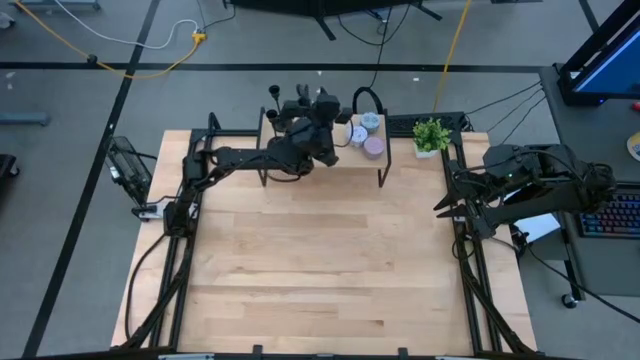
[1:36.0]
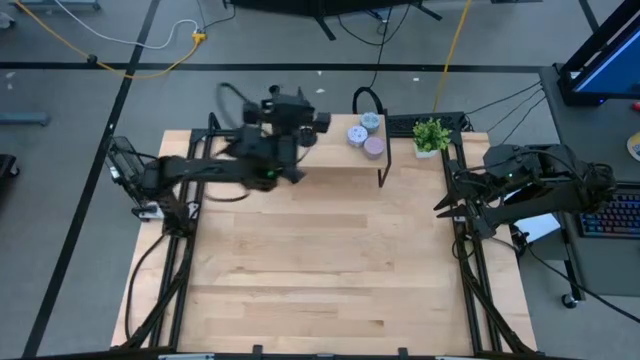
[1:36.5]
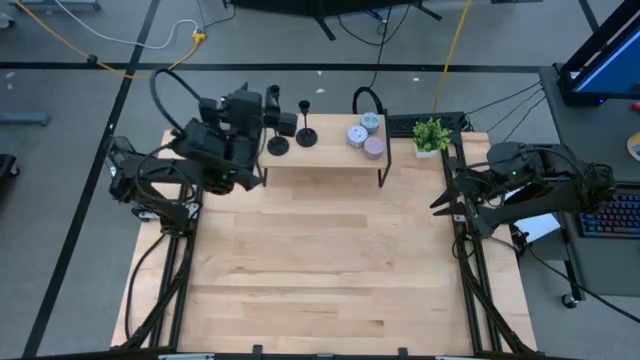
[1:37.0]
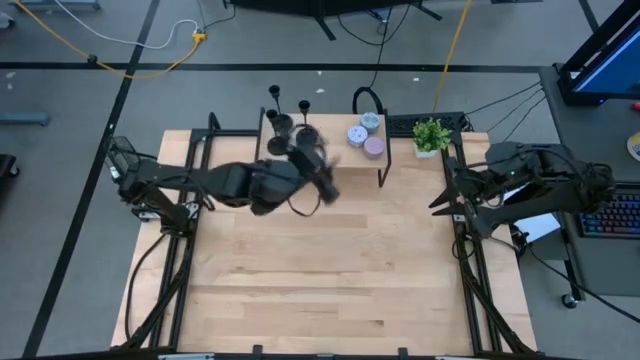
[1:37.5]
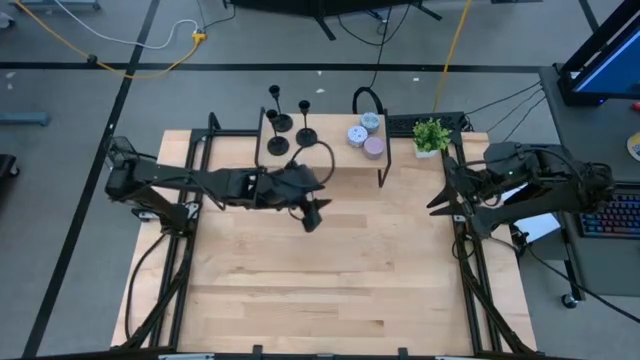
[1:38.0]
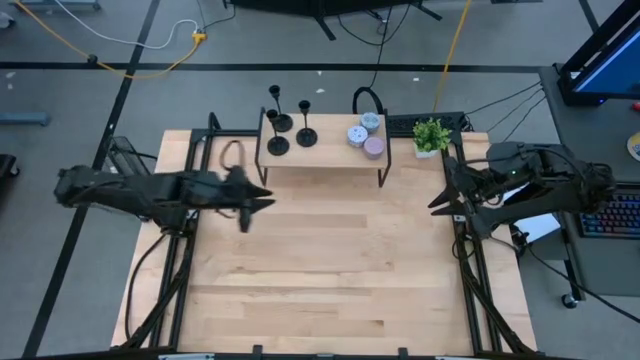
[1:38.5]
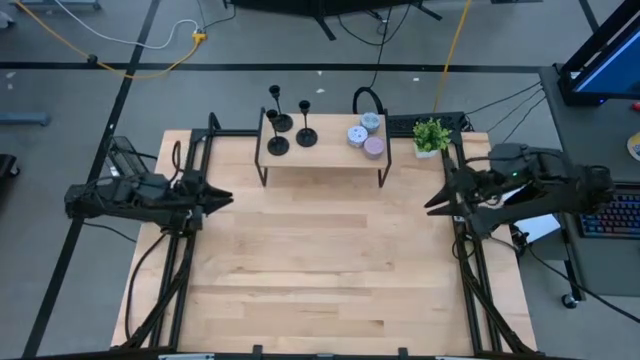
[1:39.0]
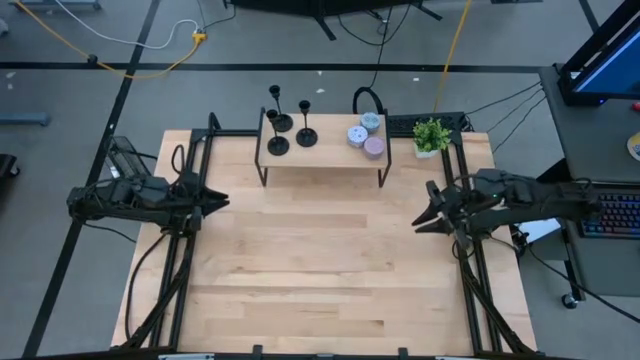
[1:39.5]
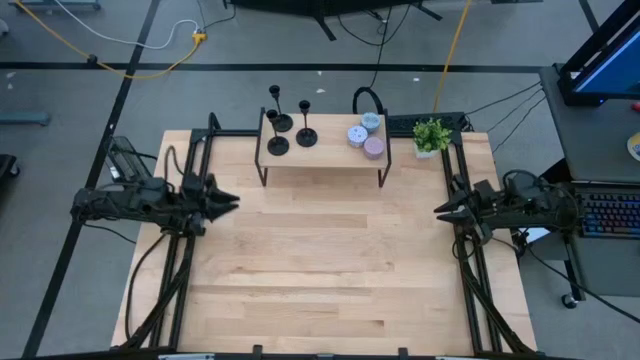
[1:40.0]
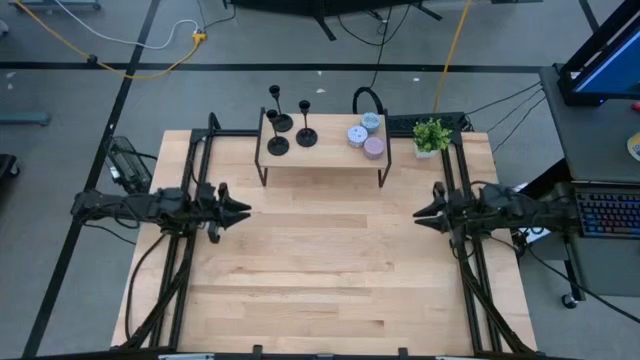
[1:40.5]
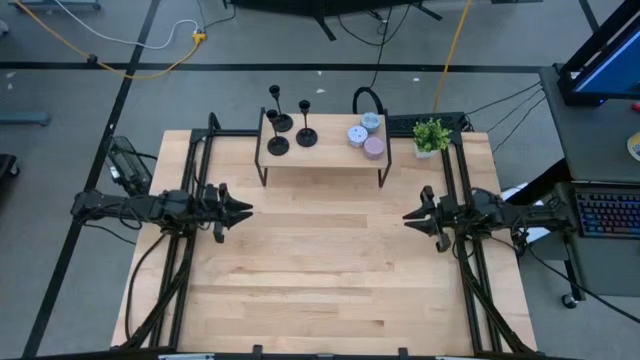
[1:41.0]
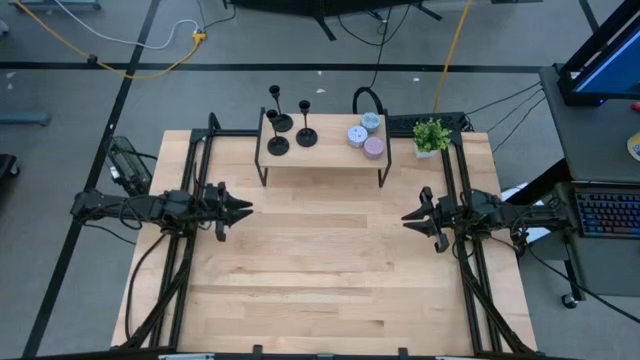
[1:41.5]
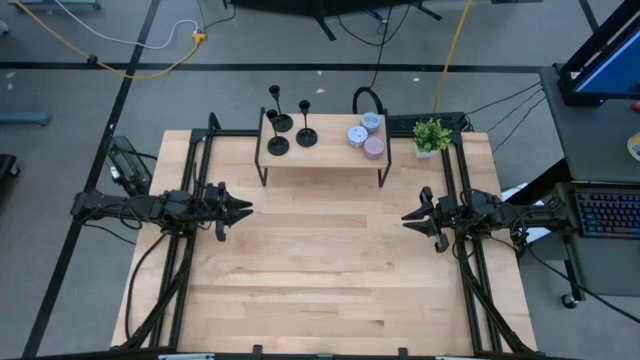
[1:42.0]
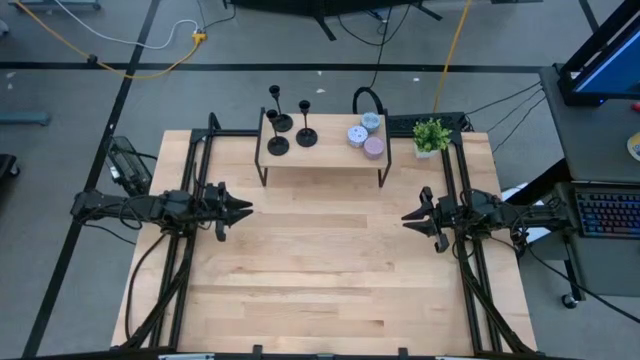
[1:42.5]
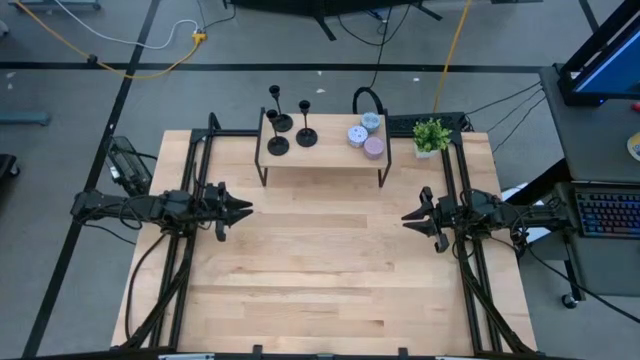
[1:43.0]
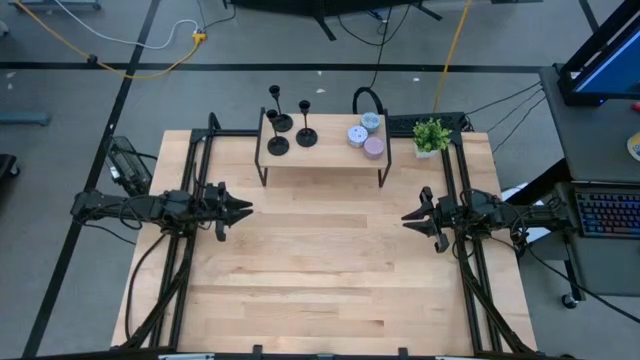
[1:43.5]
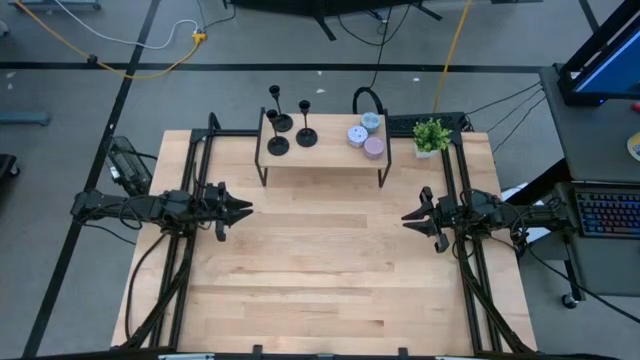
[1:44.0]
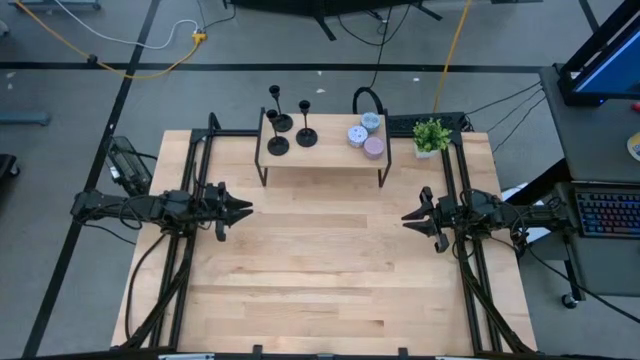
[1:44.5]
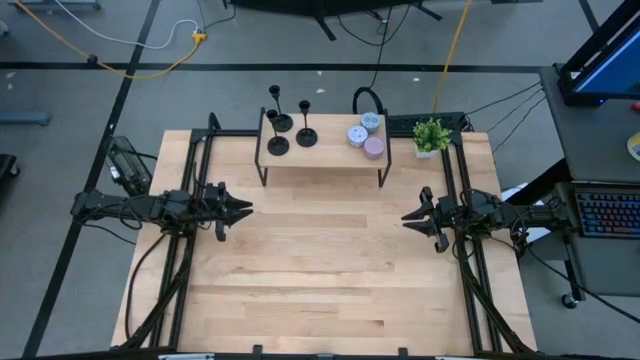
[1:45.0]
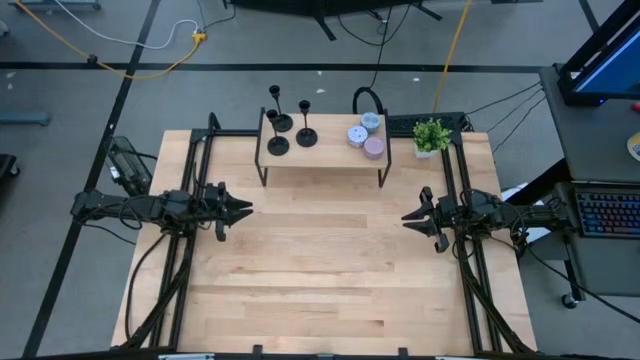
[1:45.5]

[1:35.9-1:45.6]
Task: Pick & Place candle stick holders
Return to Home Position

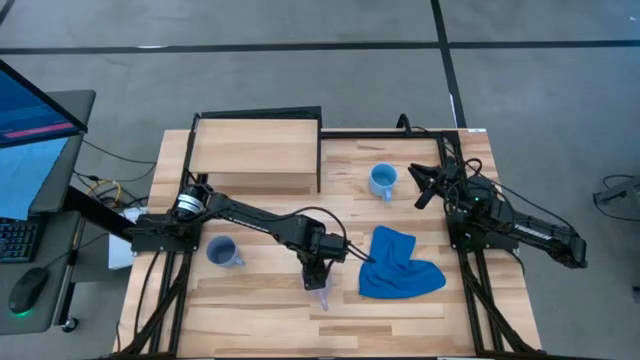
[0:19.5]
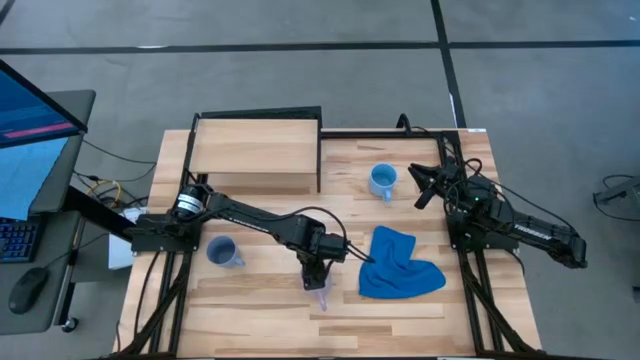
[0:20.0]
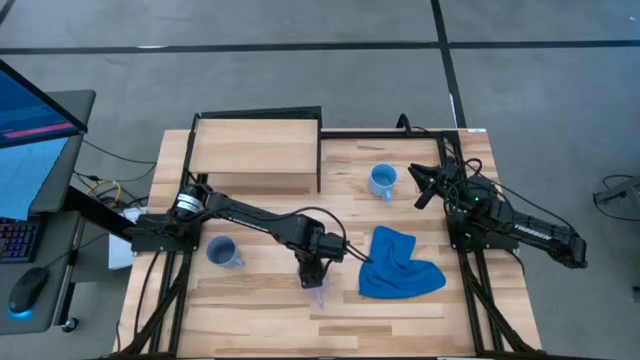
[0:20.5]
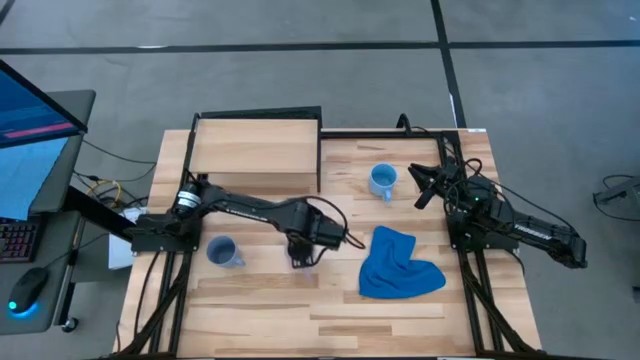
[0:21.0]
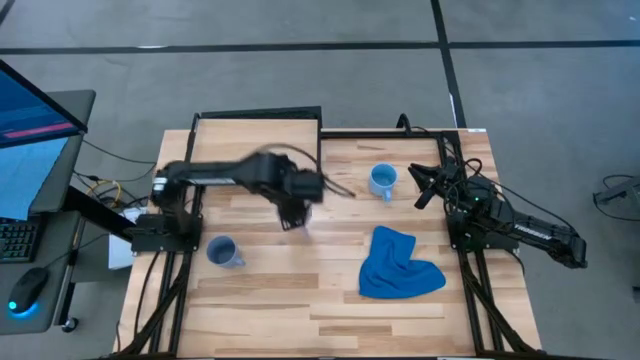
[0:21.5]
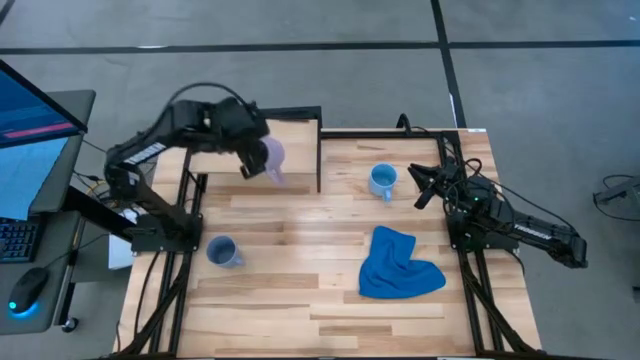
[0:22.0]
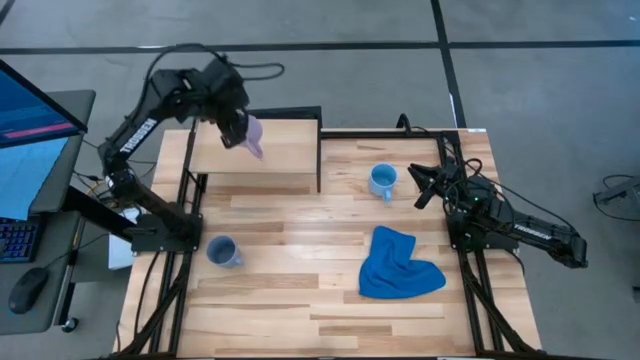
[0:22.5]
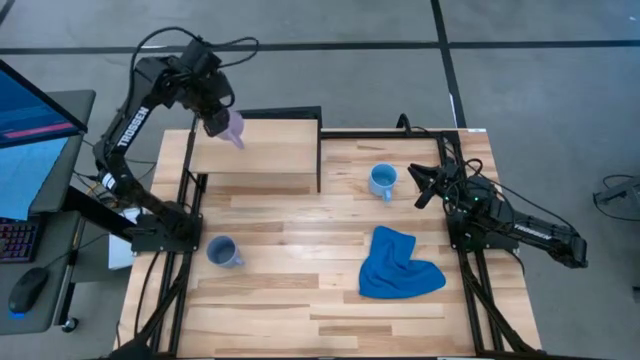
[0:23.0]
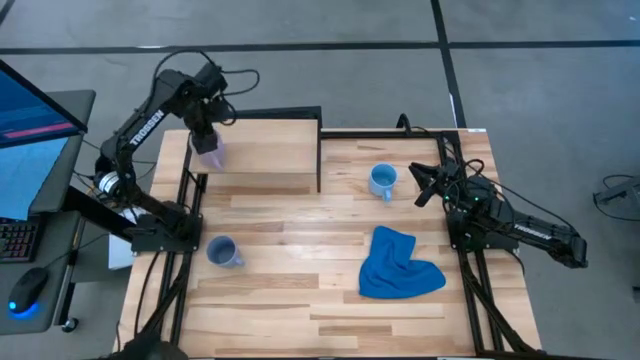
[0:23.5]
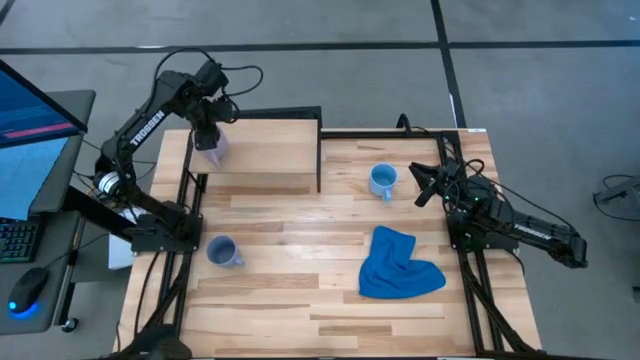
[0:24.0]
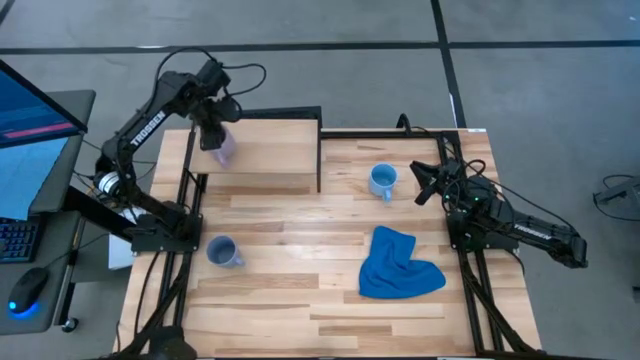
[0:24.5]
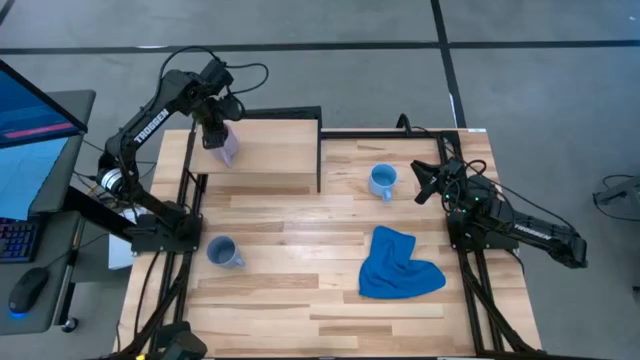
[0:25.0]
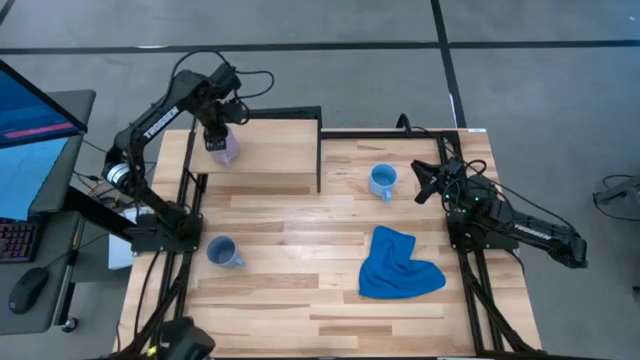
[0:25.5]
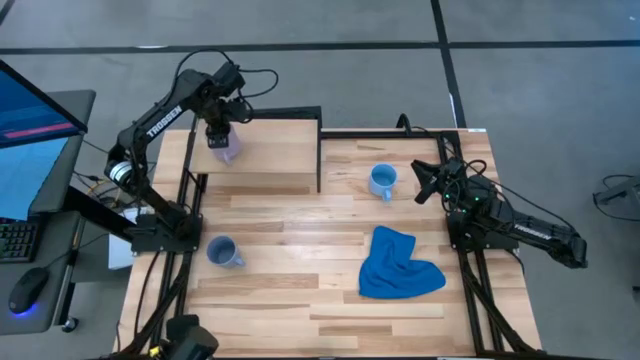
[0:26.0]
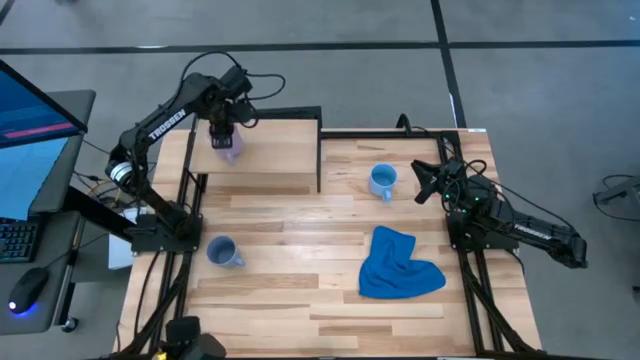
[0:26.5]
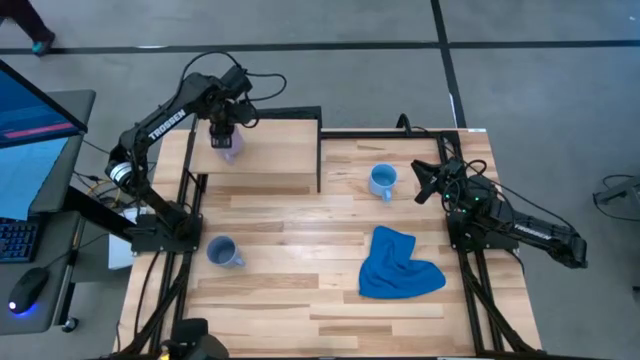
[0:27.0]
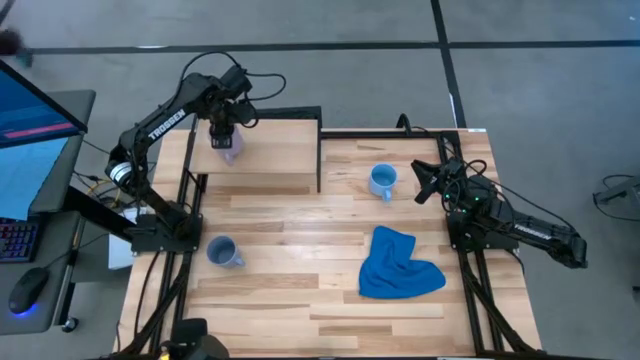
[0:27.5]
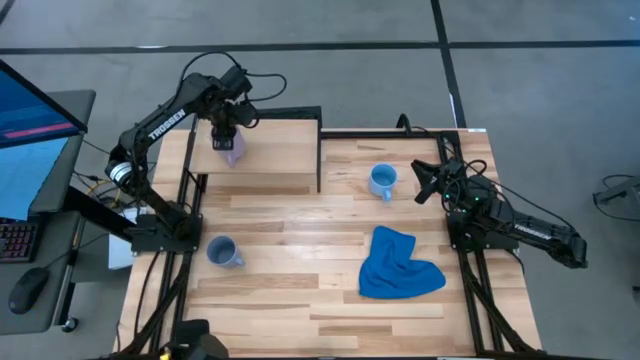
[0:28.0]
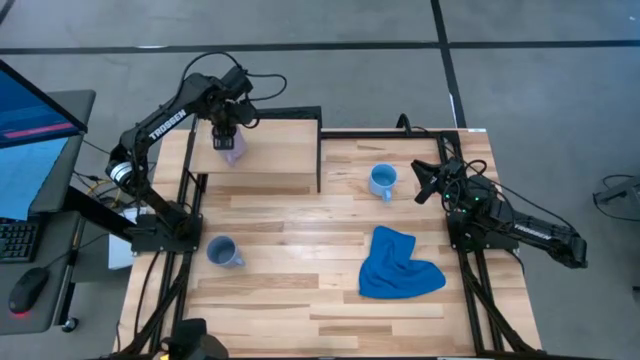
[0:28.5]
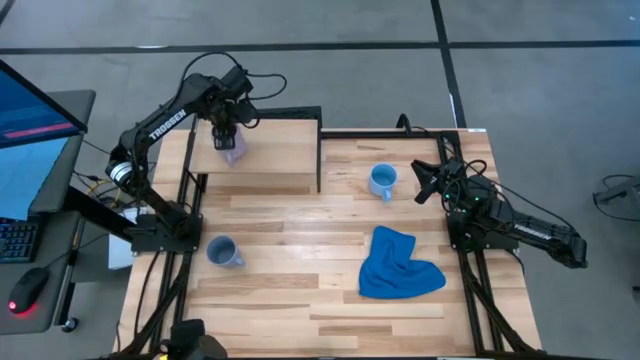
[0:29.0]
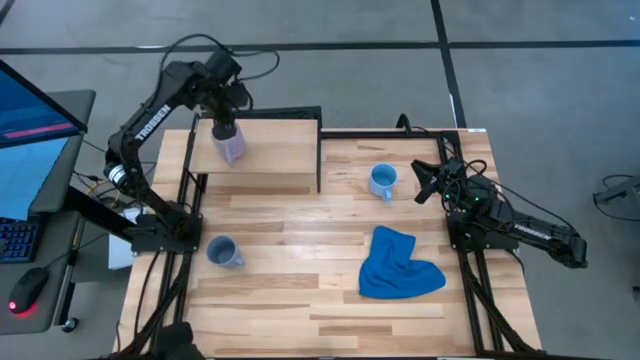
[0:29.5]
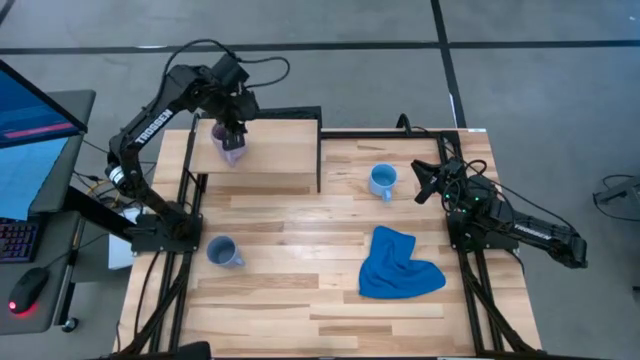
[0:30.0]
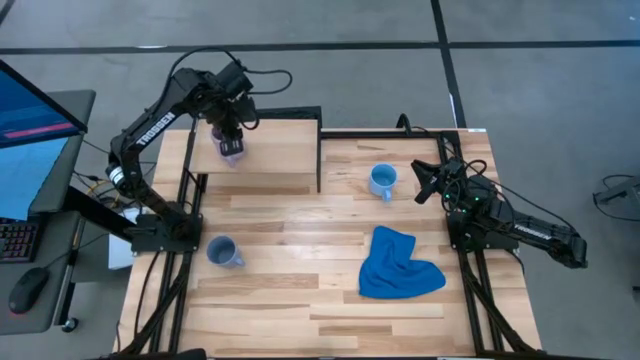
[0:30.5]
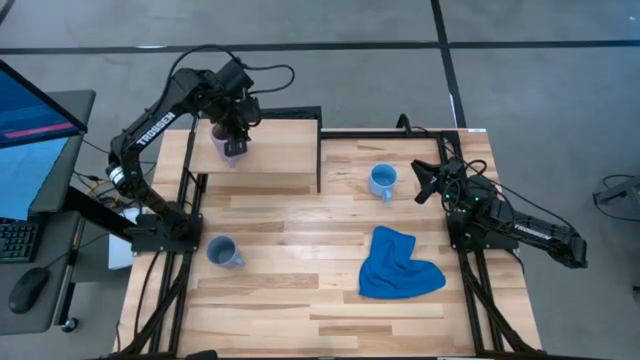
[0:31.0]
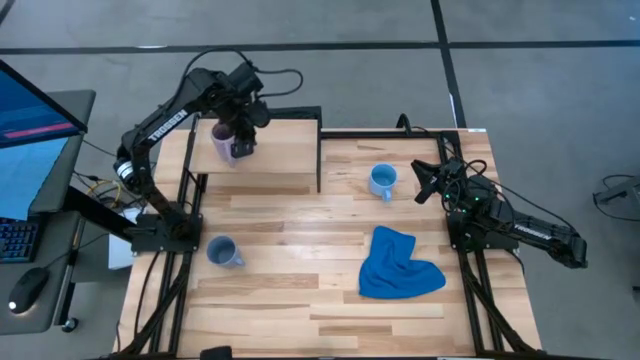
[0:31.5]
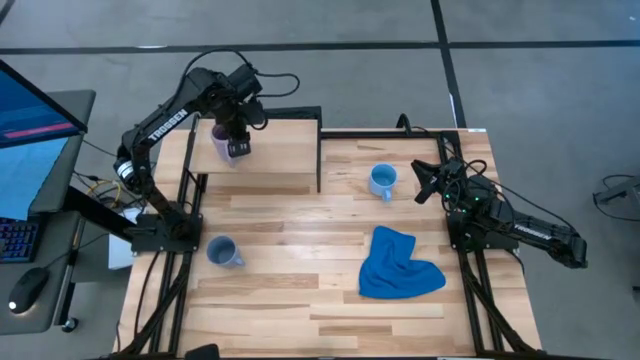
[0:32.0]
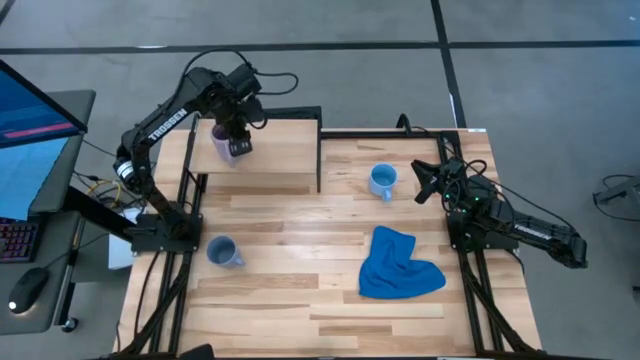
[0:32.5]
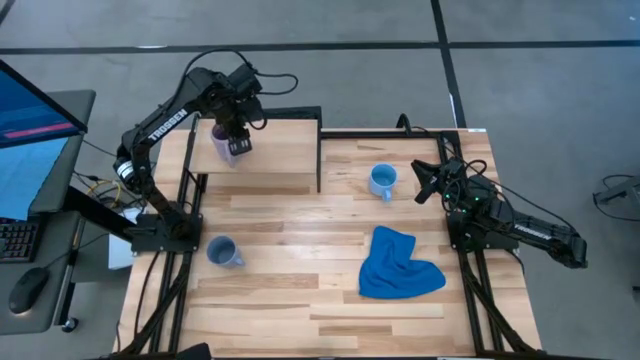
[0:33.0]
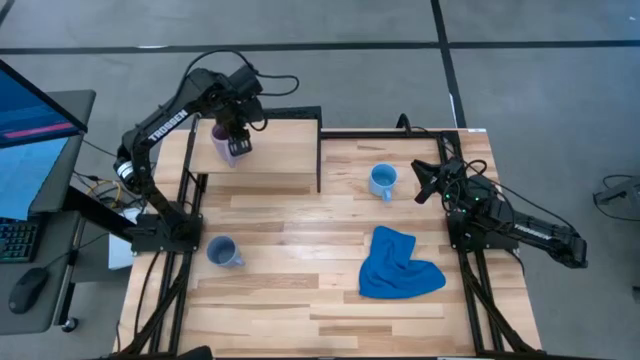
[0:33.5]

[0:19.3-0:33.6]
Task: Stack small to large cups/mugs on shelf
Put the pink cup on the shelf
